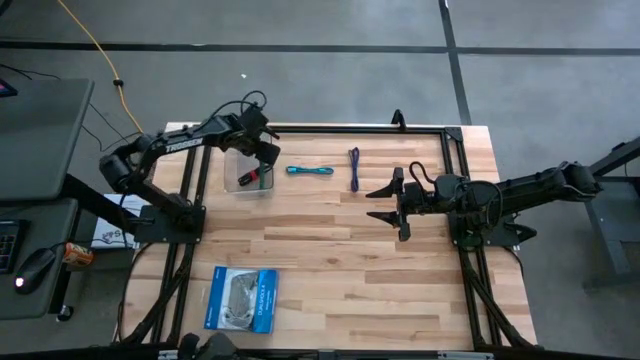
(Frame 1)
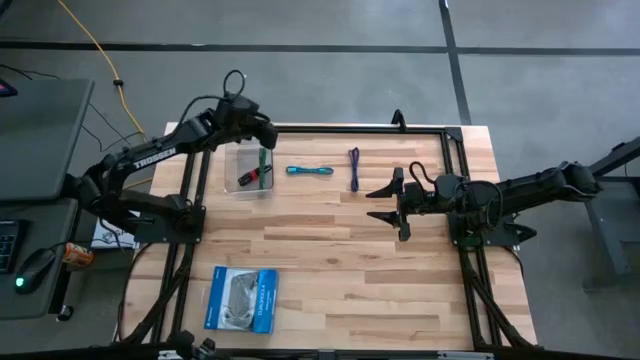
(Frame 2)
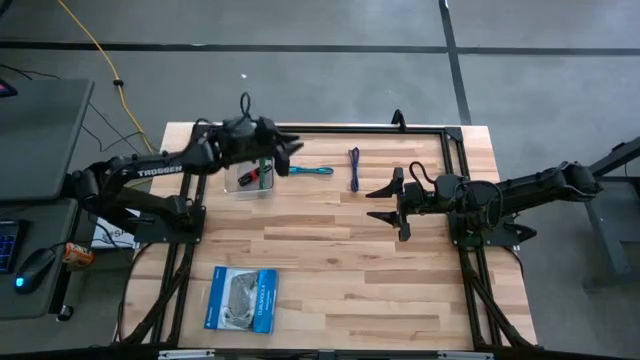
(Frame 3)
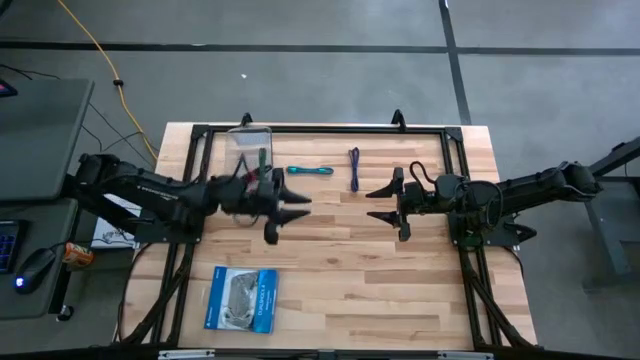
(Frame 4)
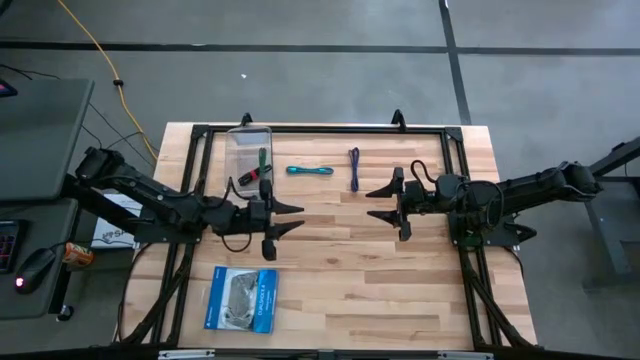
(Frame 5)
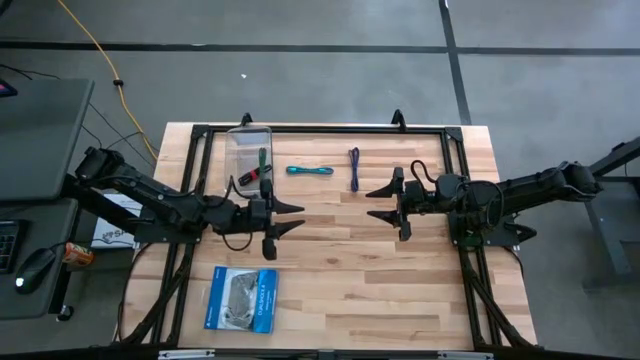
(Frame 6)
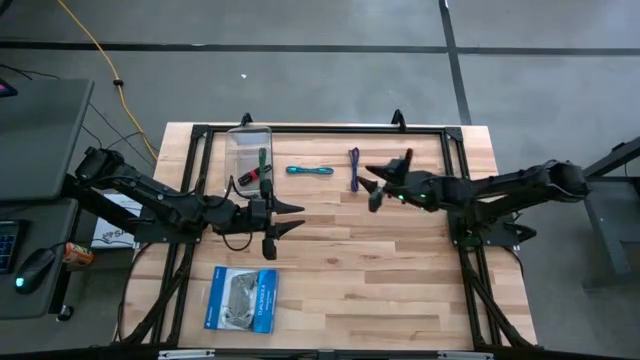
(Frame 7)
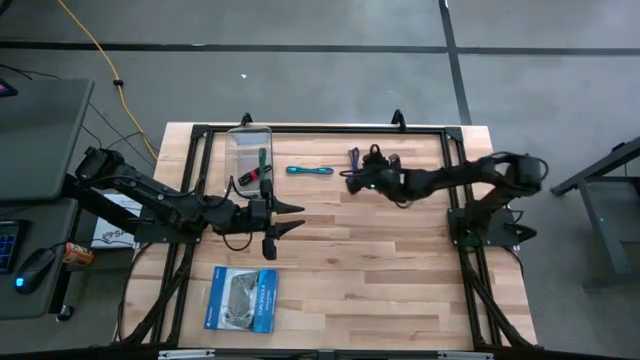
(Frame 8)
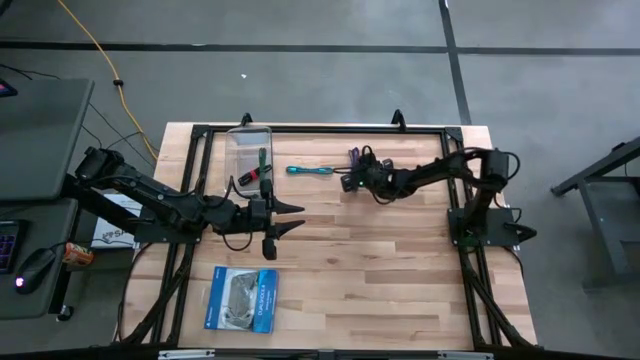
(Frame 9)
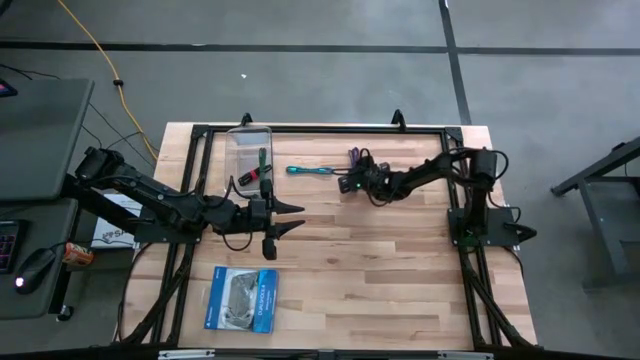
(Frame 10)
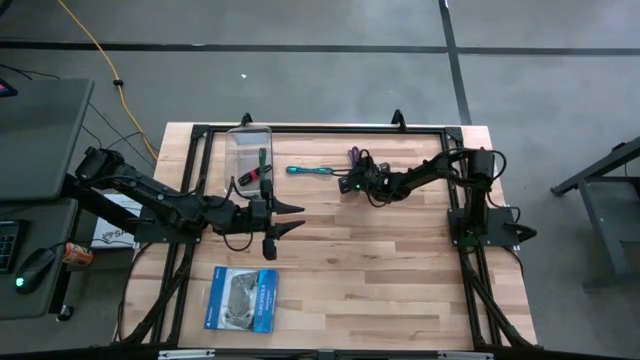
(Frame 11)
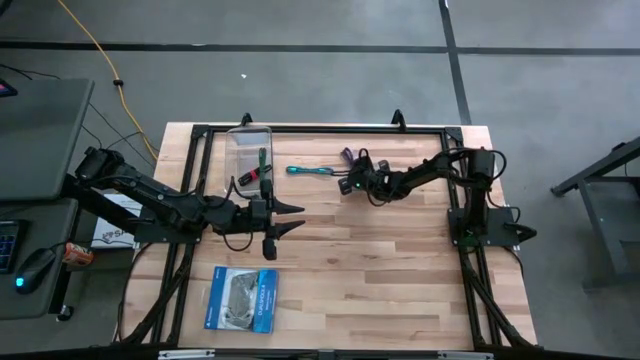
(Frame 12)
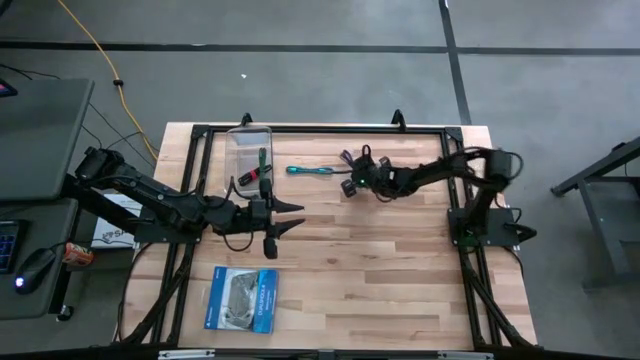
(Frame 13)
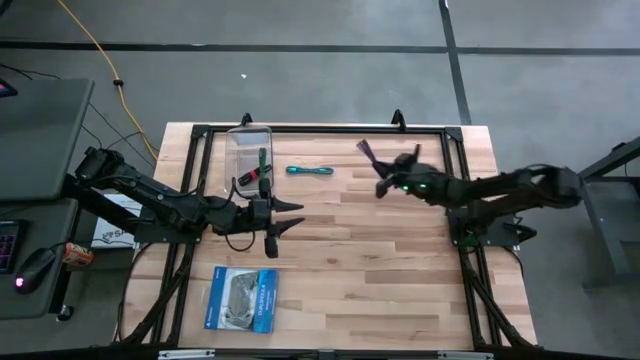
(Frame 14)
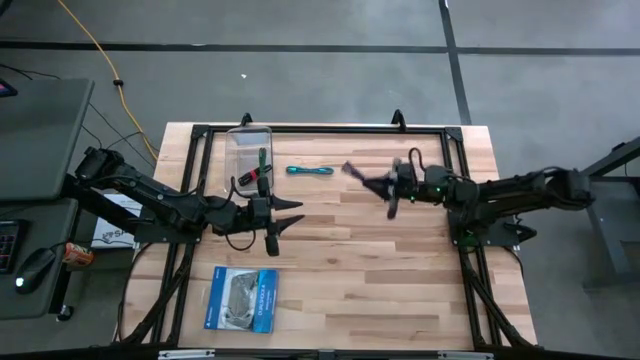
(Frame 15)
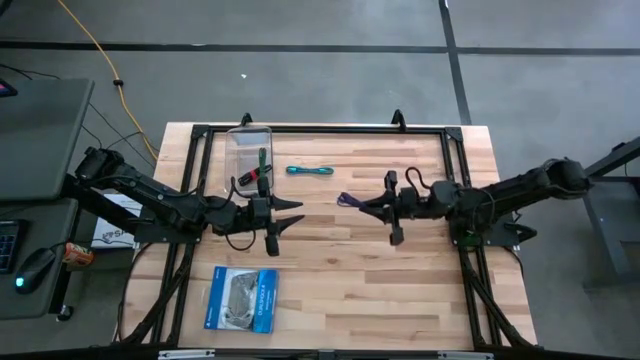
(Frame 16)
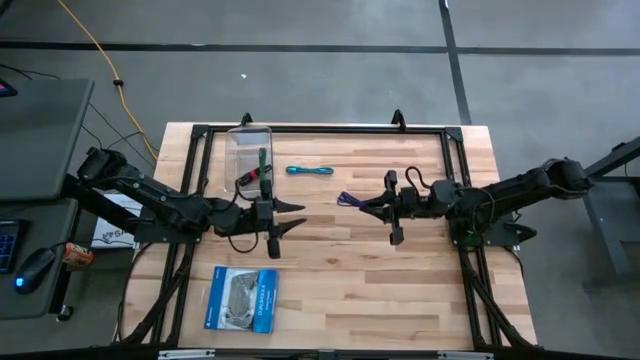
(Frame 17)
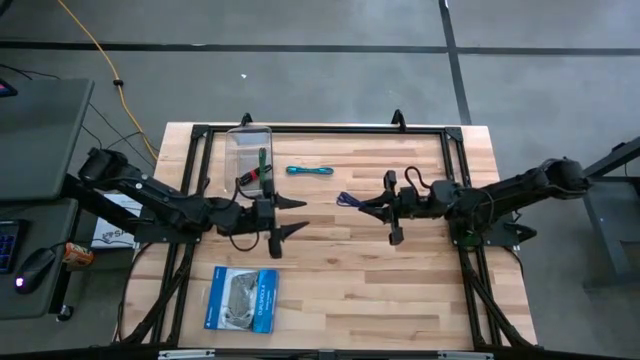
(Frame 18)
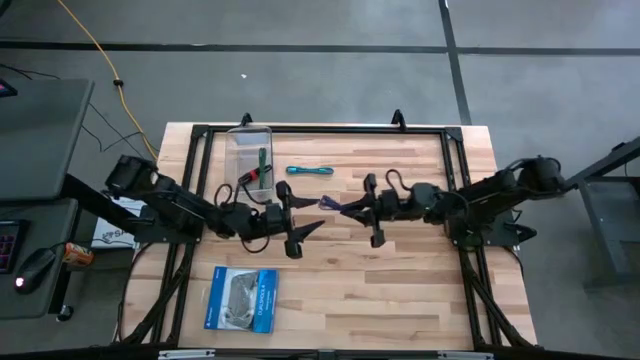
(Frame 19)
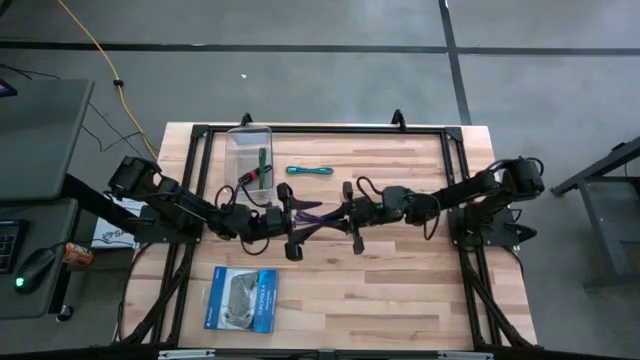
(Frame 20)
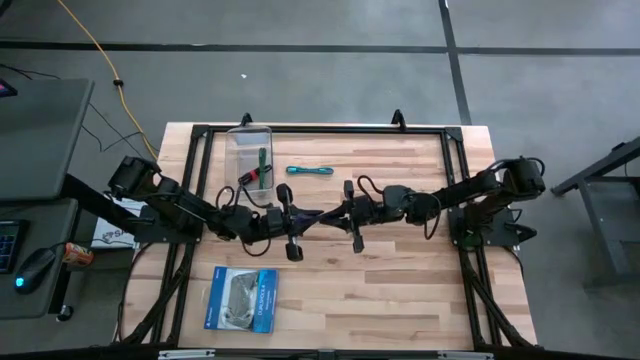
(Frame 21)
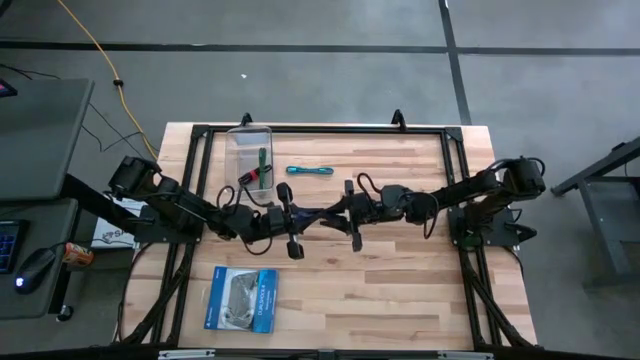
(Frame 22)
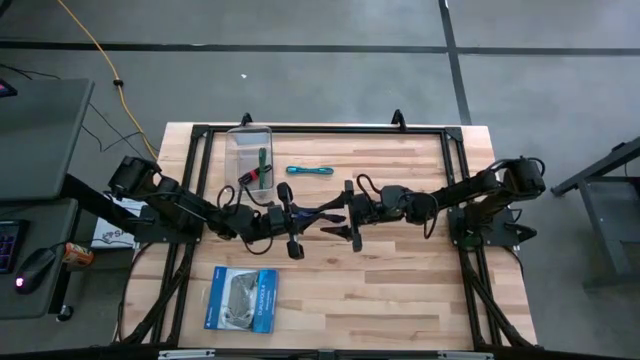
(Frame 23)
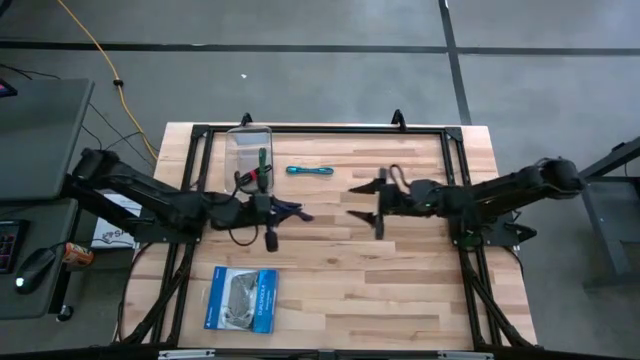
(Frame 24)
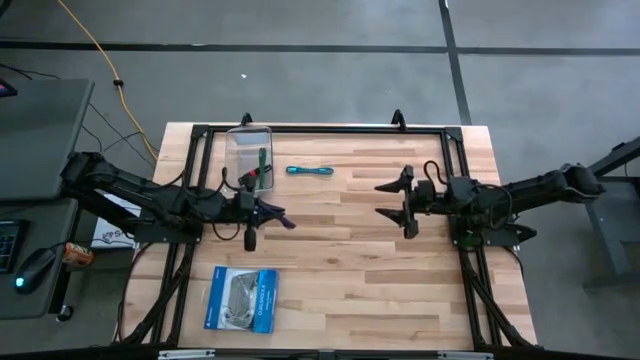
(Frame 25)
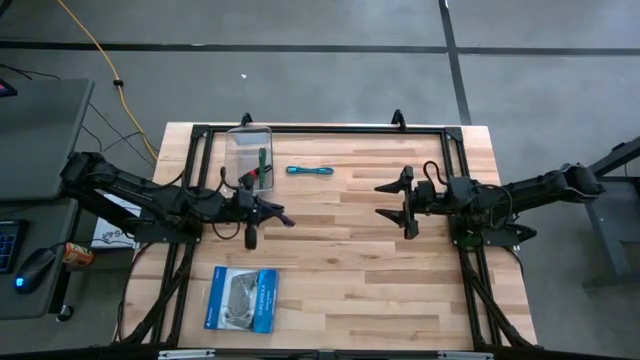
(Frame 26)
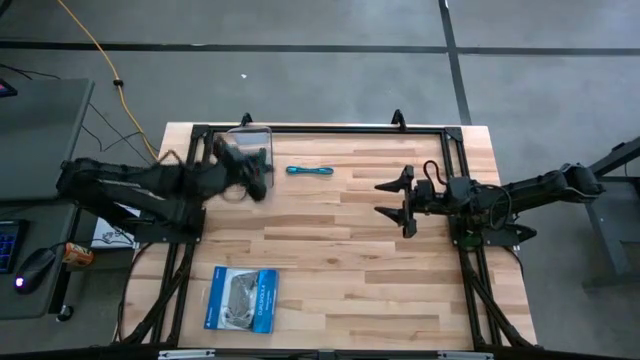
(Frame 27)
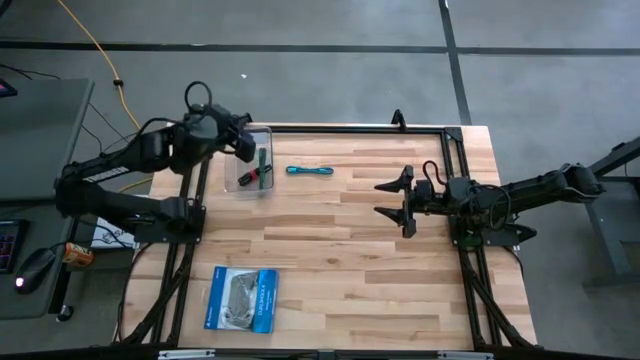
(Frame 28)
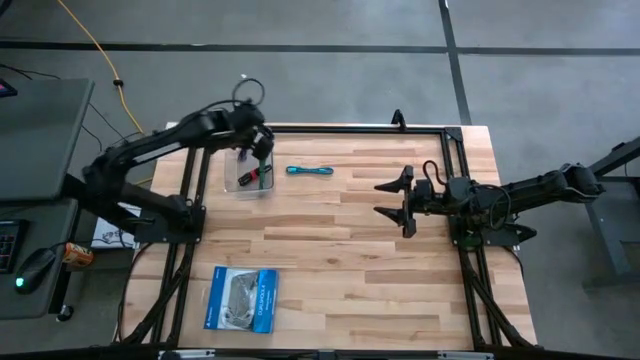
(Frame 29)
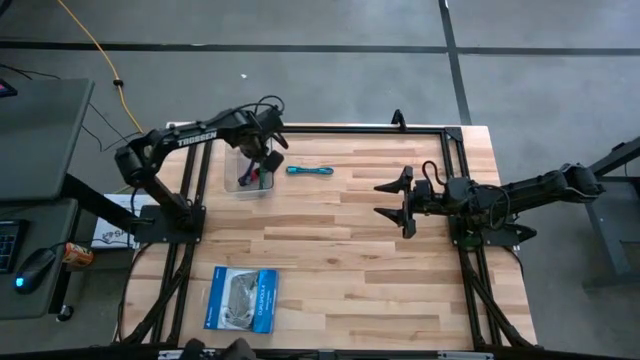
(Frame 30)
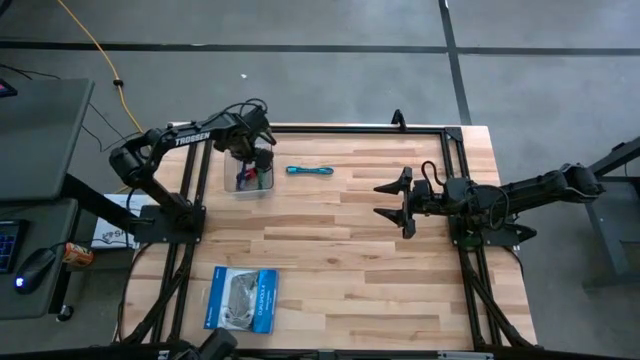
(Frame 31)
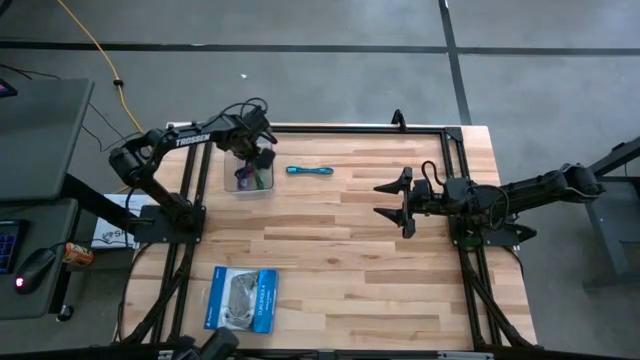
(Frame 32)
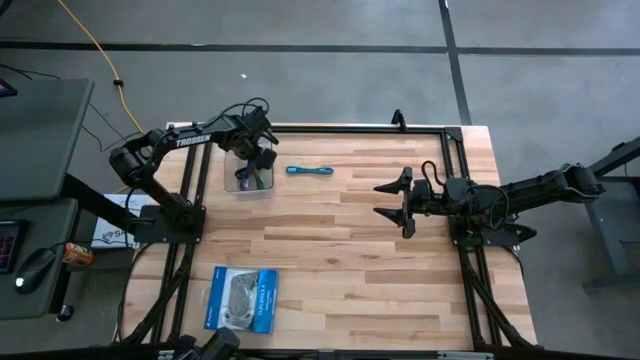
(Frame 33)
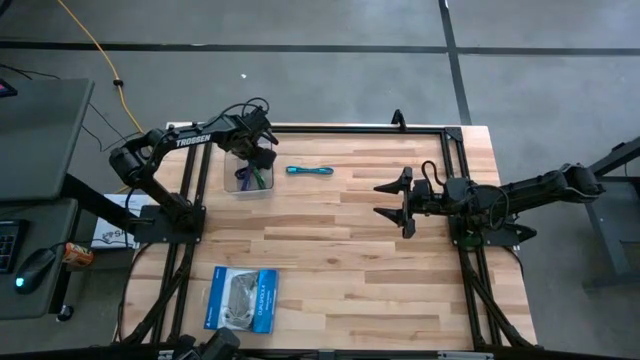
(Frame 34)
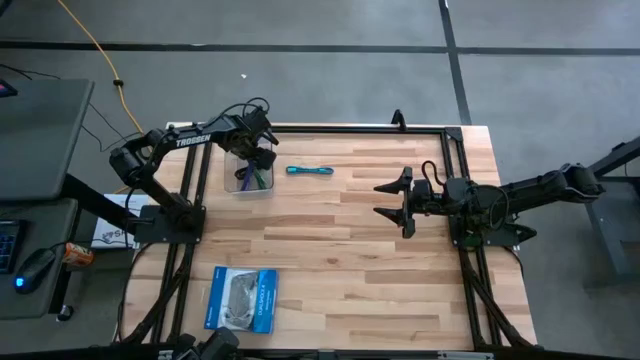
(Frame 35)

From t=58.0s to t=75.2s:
Task: Pick and place USB-C Cables
Put the purple USB cable into the transparent bin

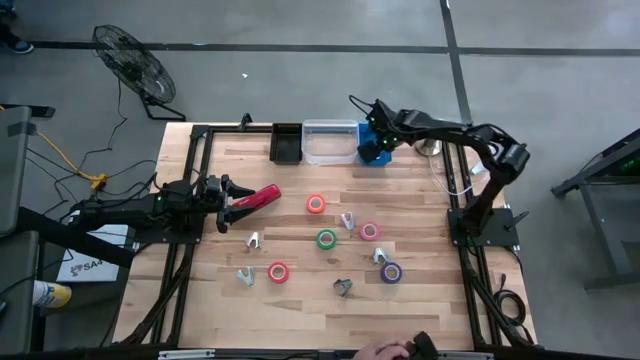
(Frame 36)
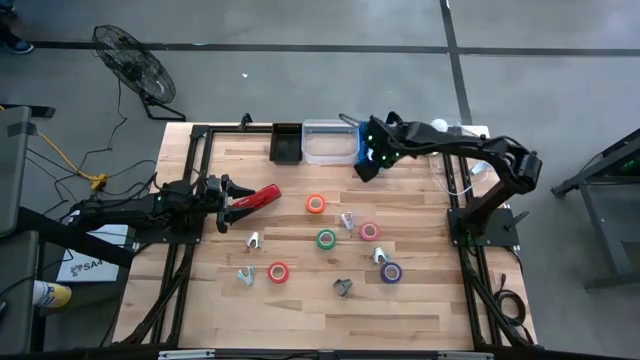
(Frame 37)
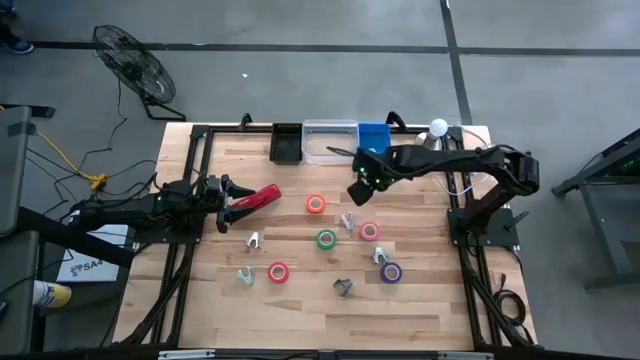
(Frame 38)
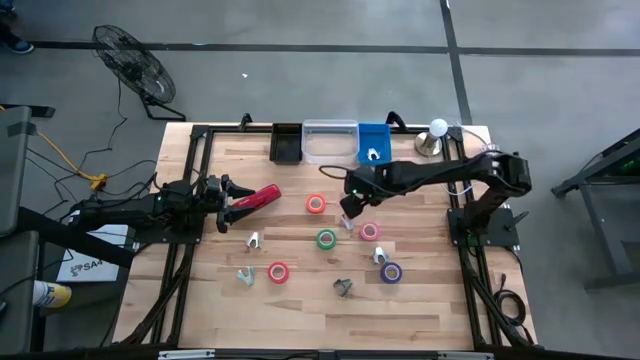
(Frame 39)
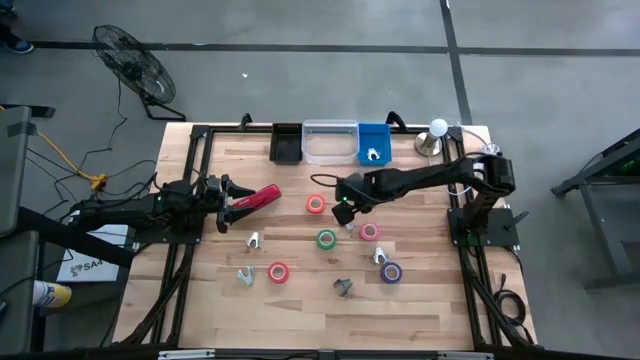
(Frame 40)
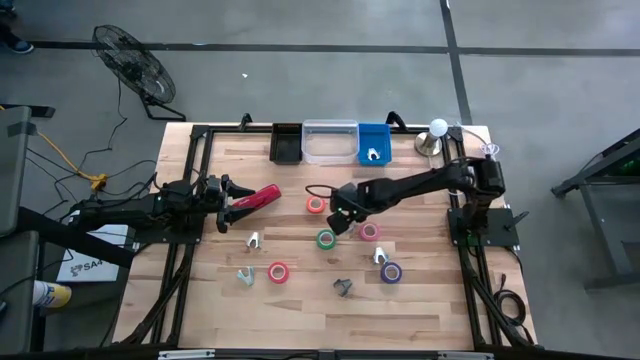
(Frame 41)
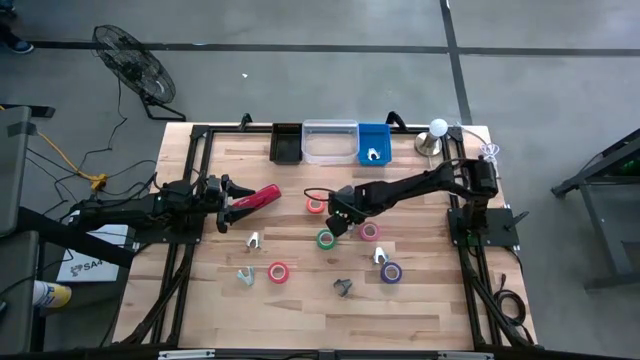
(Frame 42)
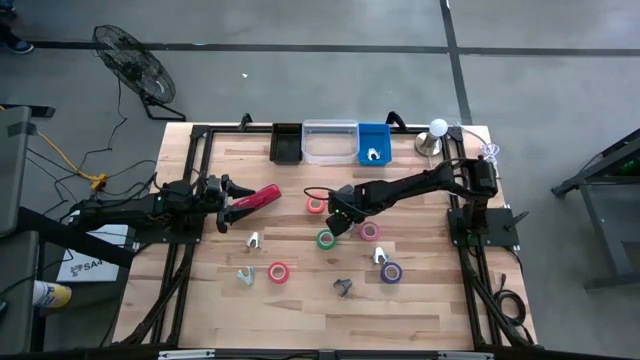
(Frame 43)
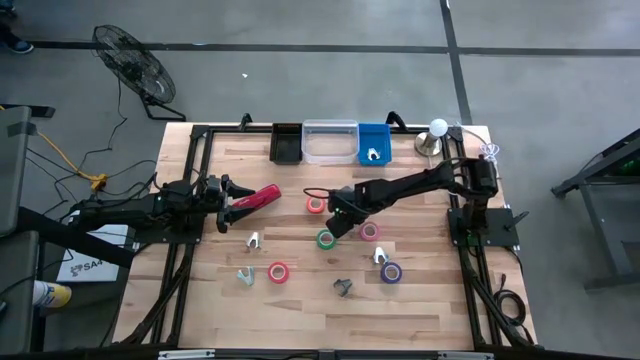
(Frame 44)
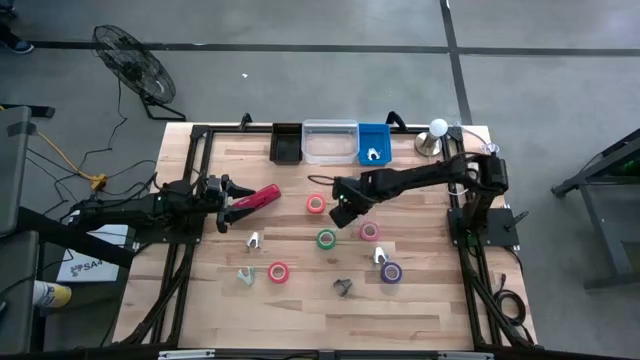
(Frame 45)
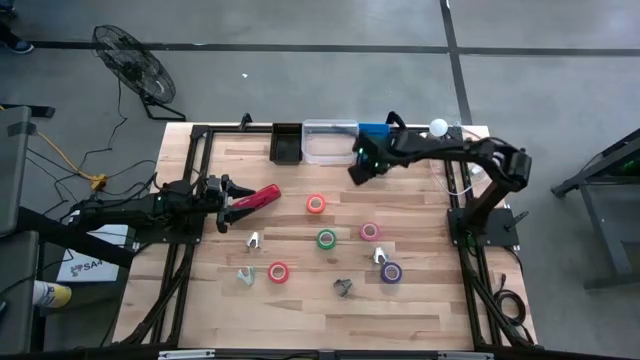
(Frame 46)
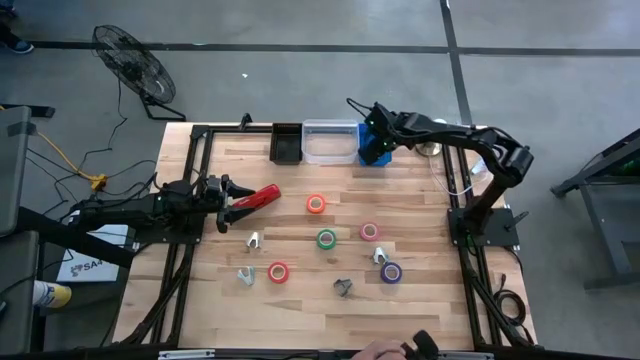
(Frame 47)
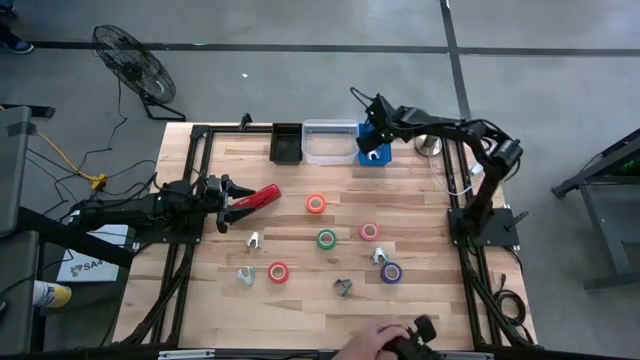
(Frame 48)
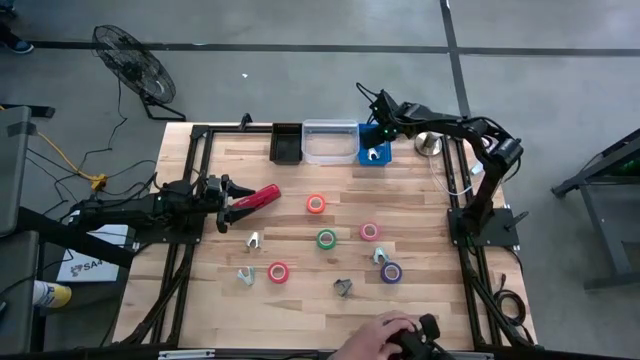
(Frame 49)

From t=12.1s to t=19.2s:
Task: Pick and place Stapler, Stapler remover, tape
Put the purple staple remover into the blue bin
